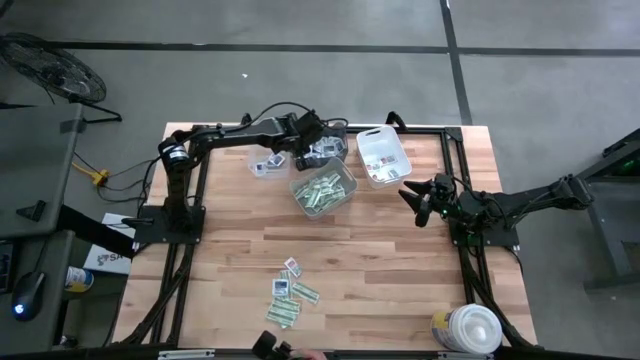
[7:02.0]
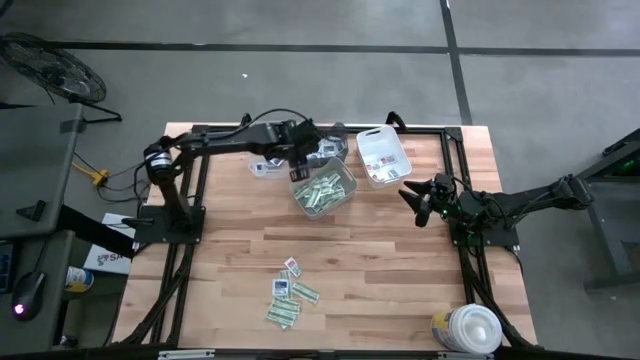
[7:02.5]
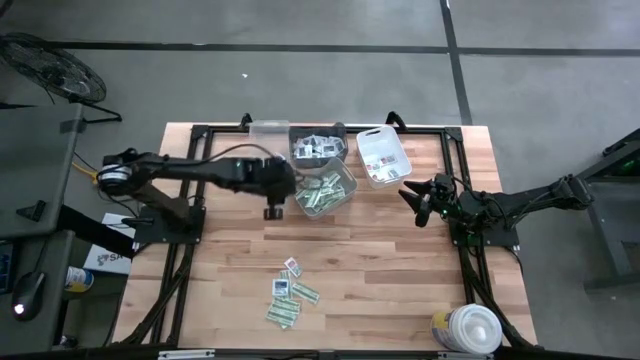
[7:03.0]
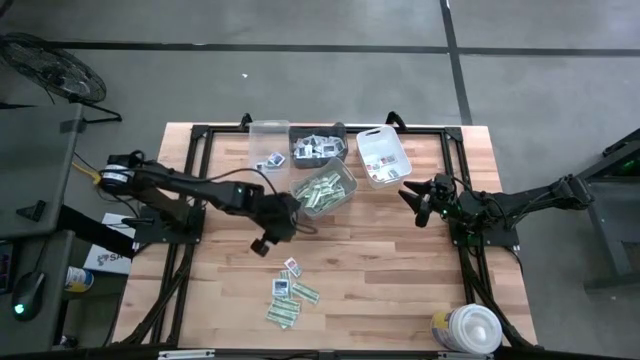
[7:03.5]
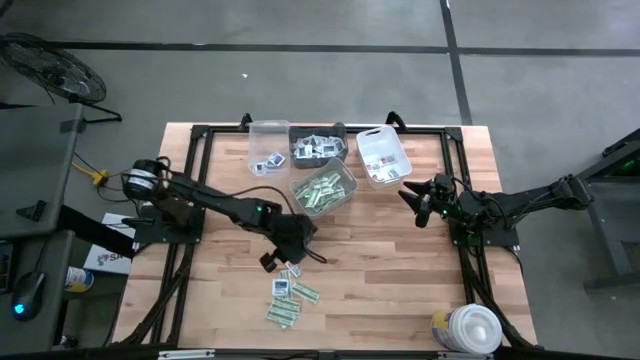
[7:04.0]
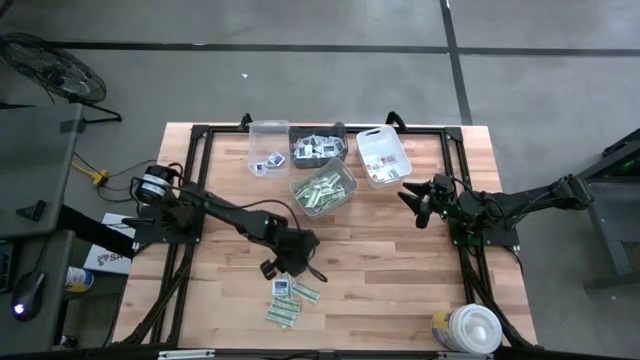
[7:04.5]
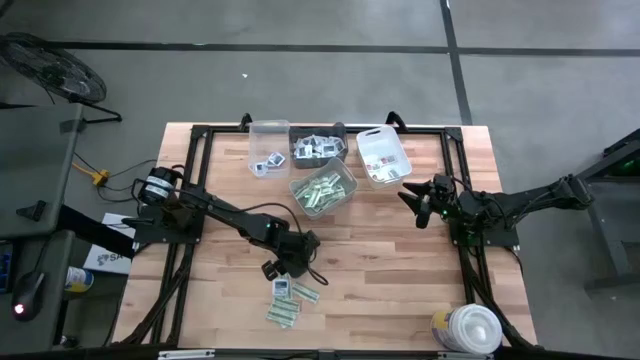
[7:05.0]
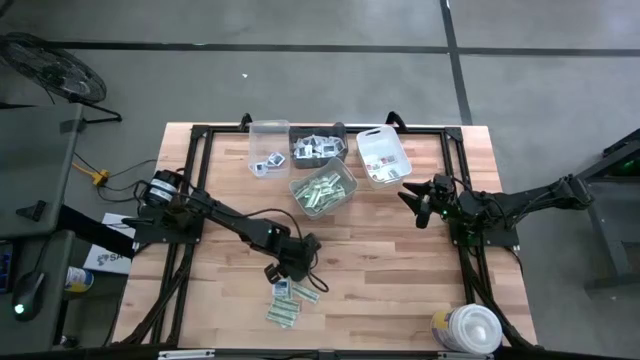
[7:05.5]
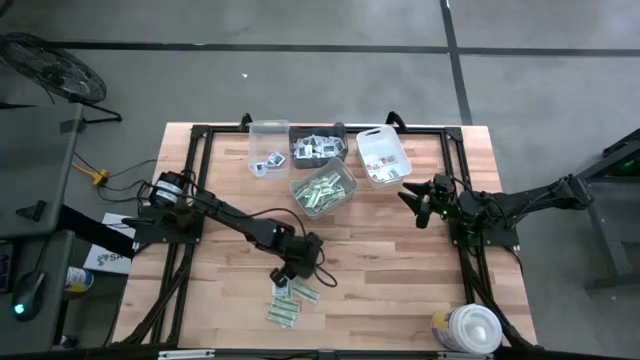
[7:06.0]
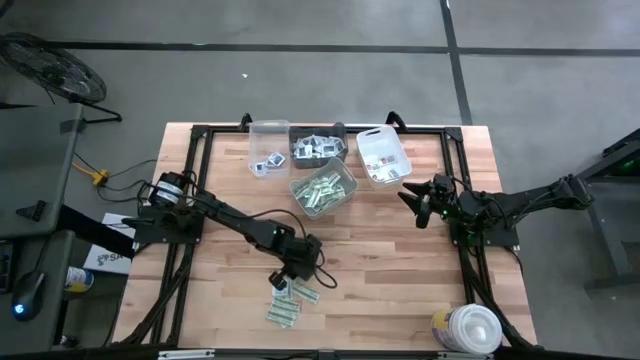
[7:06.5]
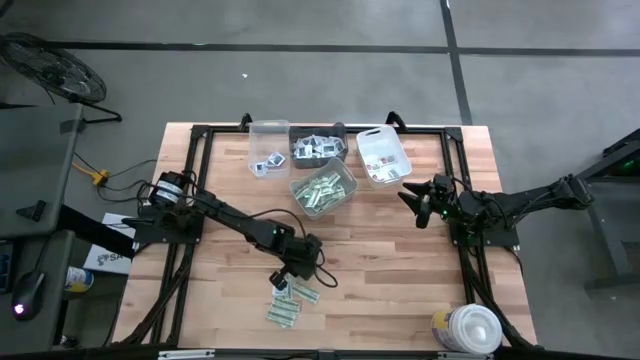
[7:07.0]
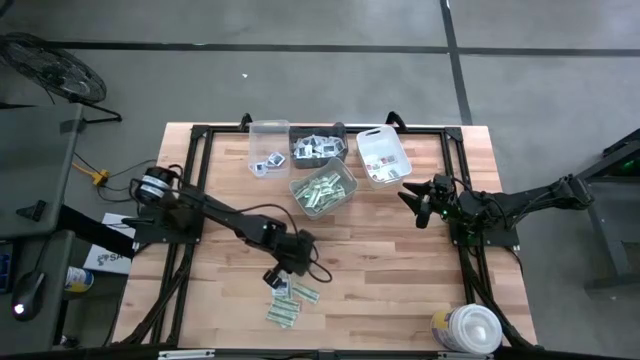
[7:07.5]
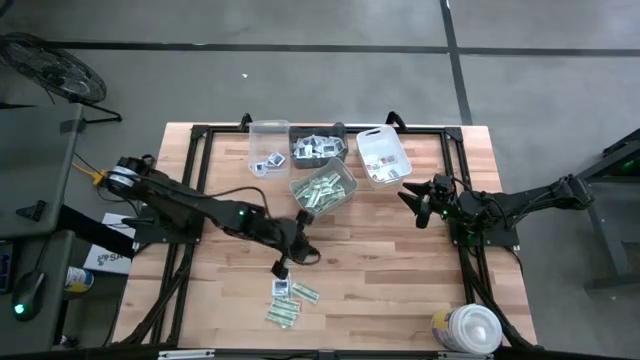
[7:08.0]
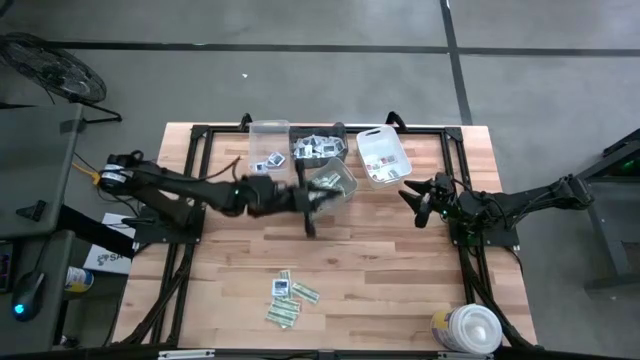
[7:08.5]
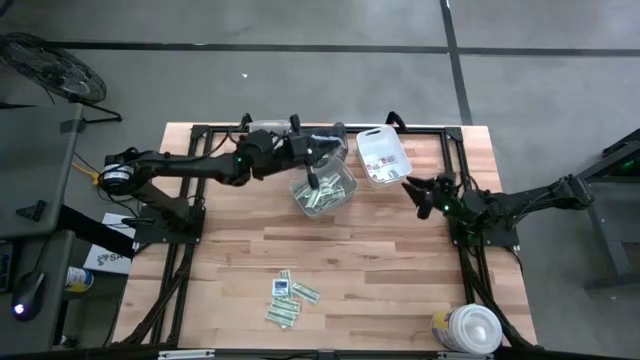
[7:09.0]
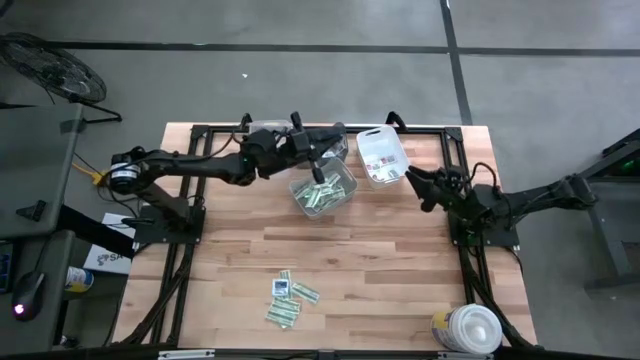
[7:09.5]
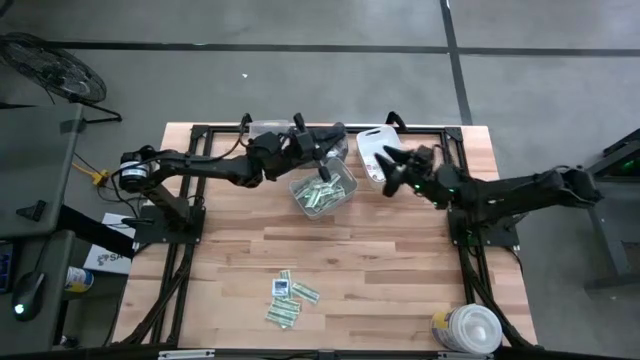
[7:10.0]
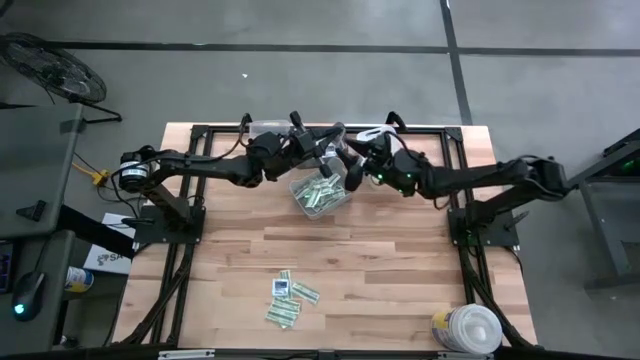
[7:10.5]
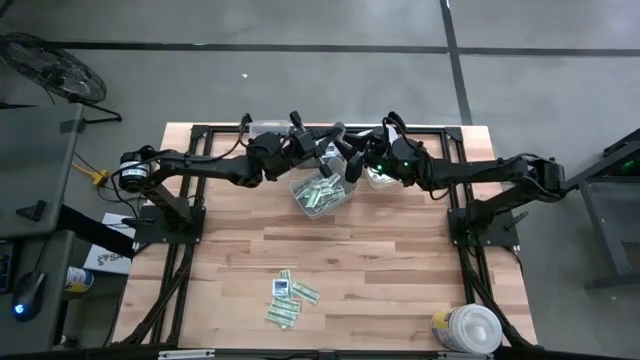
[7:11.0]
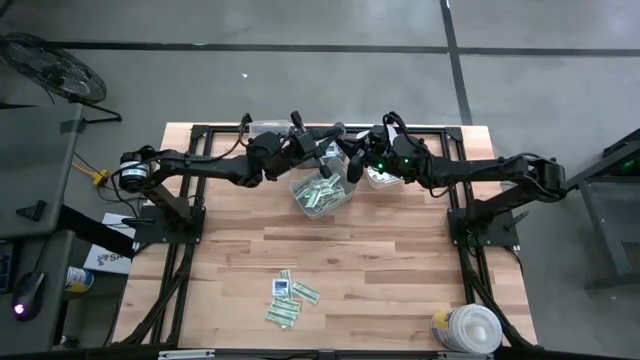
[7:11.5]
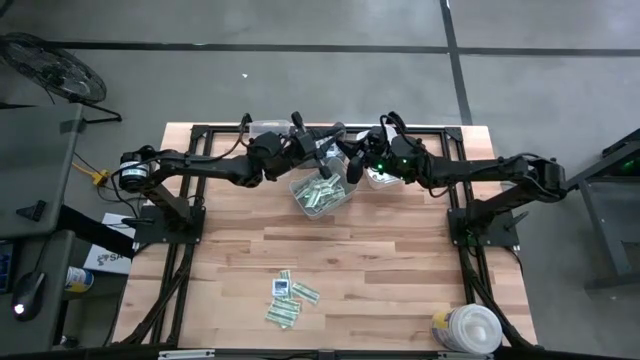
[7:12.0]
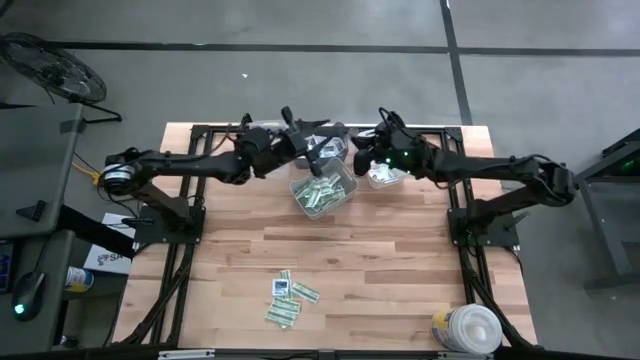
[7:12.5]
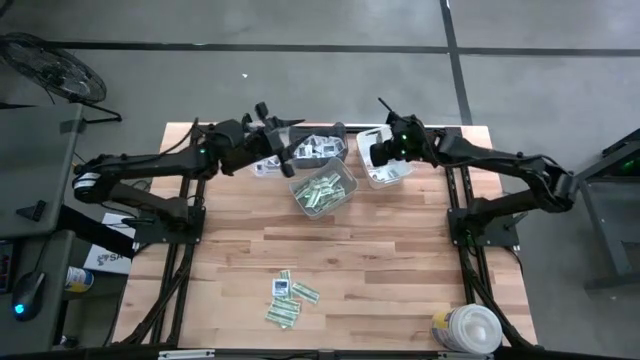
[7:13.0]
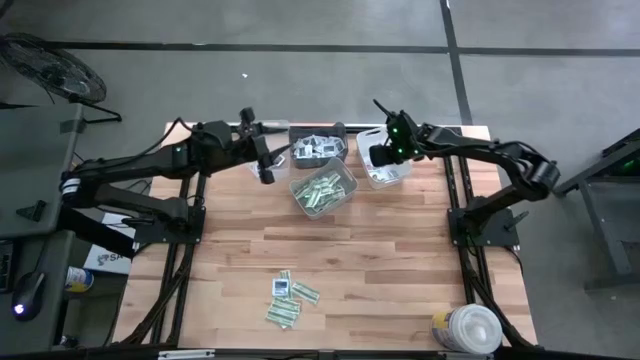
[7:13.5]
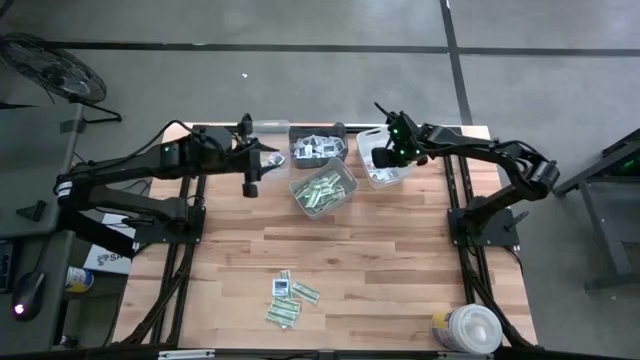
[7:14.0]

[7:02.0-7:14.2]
Task: Pick & Place First Aid Supplies
Put the ointment pack into the white bin

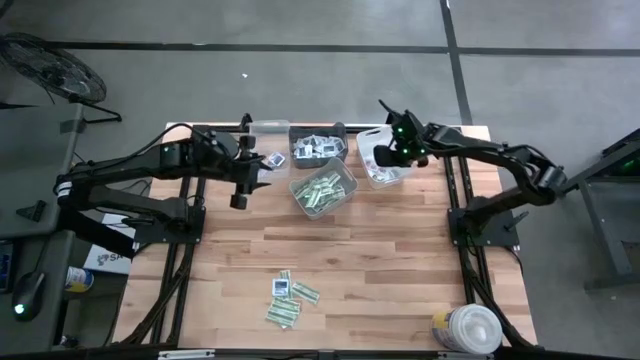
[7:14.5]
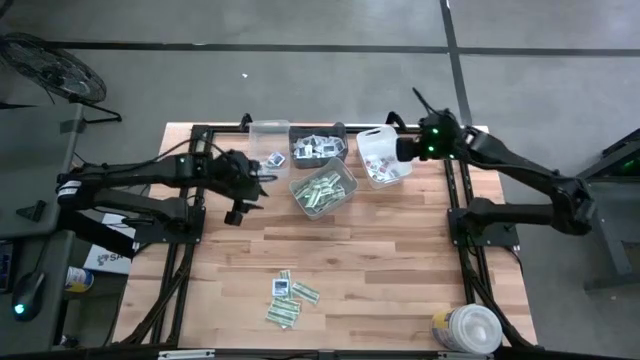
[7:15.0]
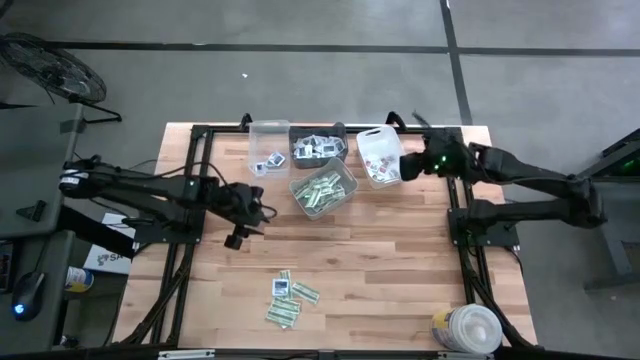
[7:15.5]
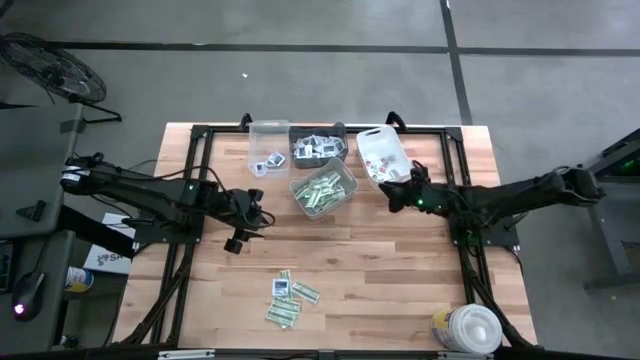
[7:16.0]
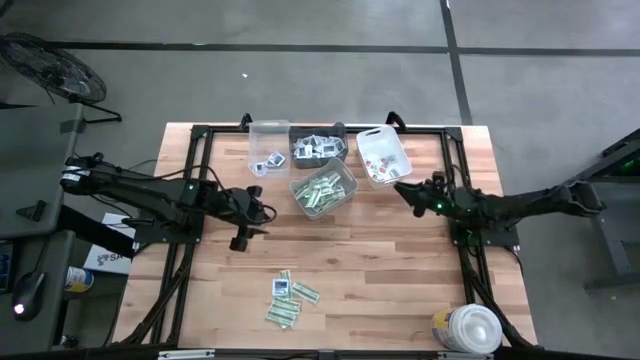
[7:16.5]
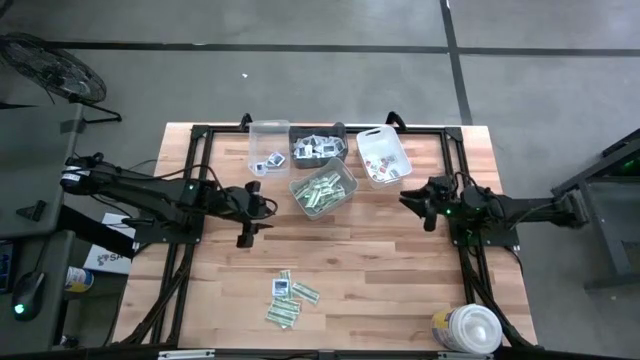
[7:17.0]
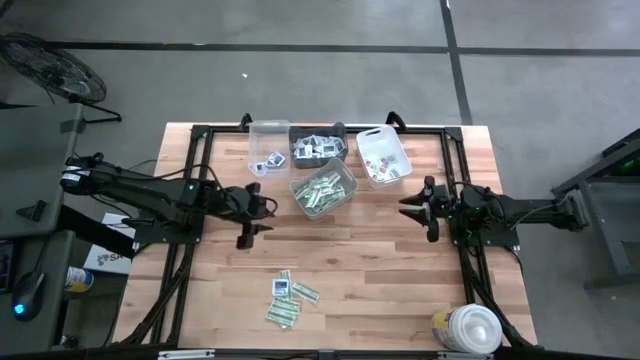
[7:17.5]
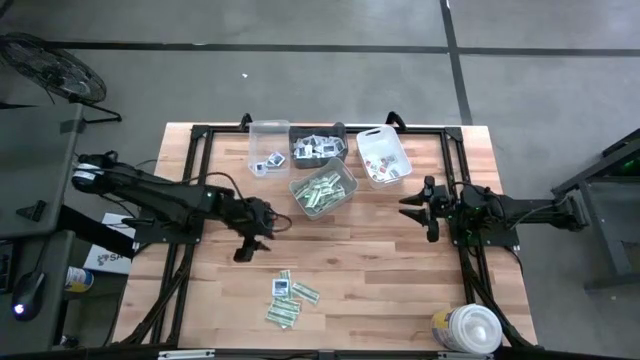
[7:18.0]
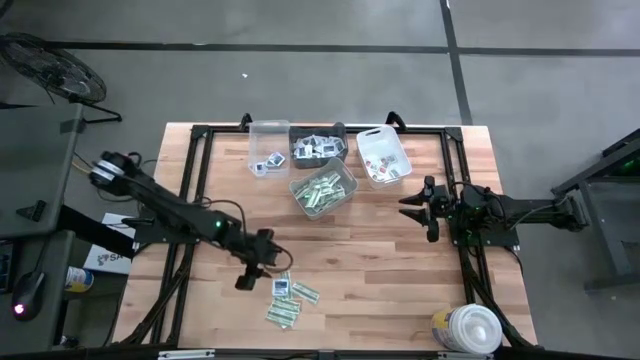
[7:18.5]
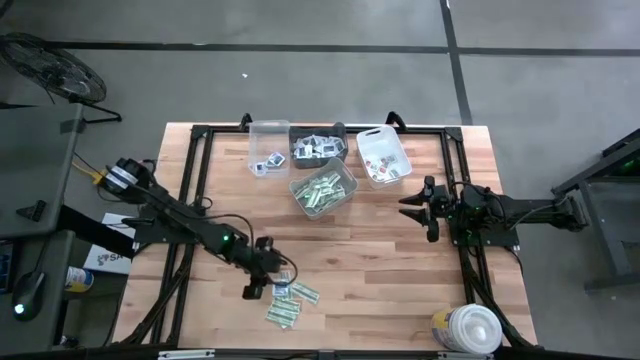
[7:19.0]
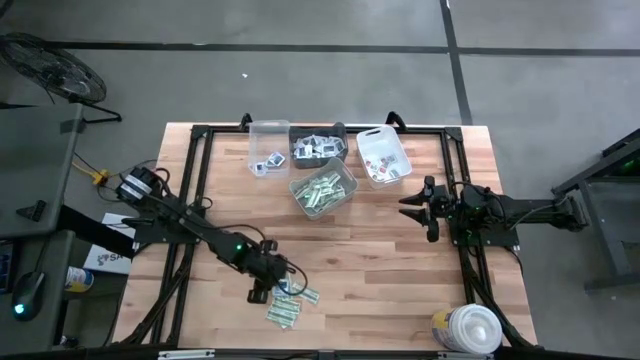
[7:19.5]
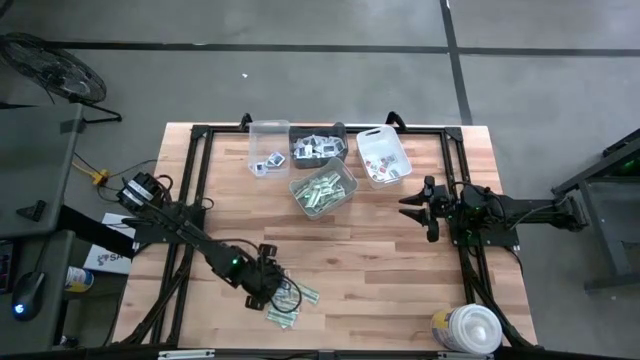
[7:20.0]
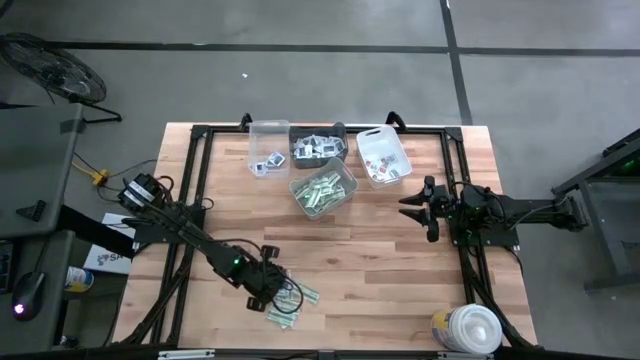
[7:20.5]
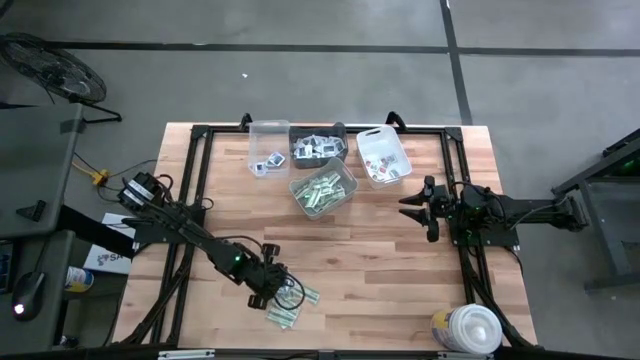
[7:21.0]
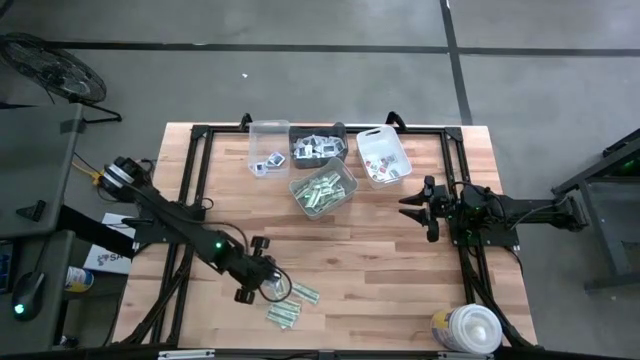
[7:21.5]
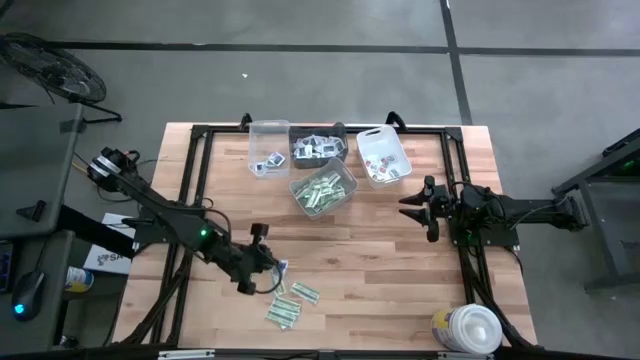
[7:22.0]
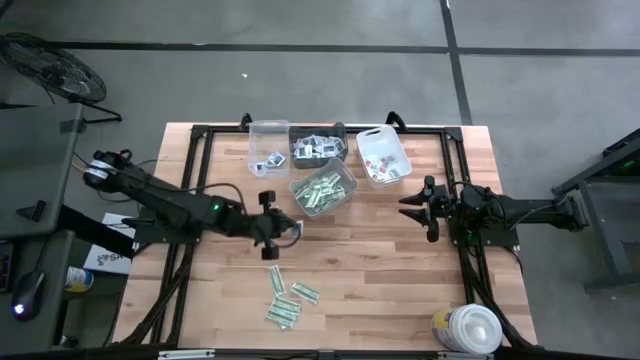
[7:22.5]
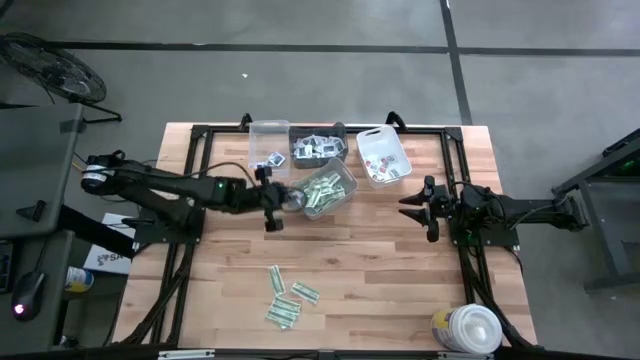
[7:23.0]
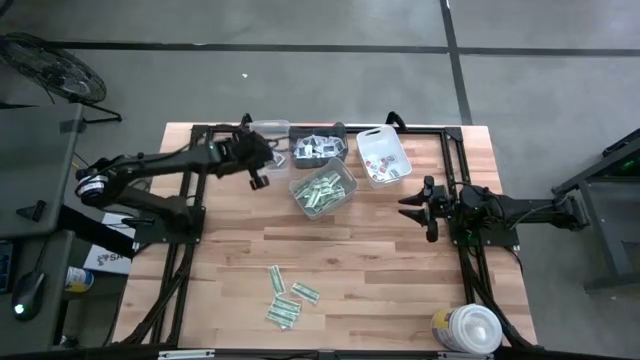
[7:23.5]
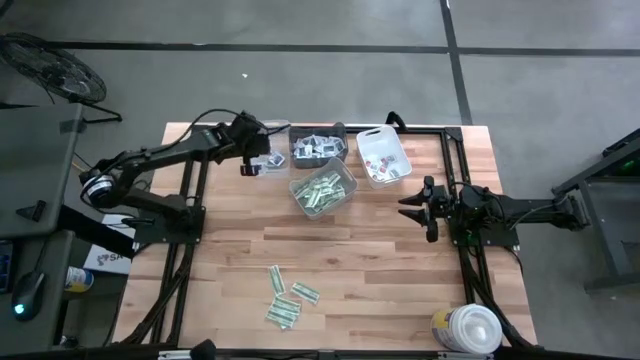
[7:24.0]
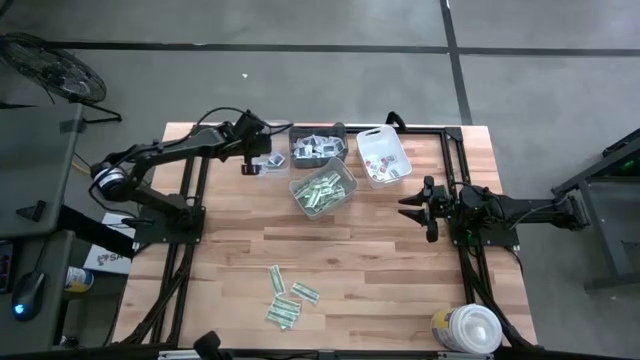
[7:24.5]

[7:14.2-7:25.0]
Put the alcohol pad into the transparent bin
